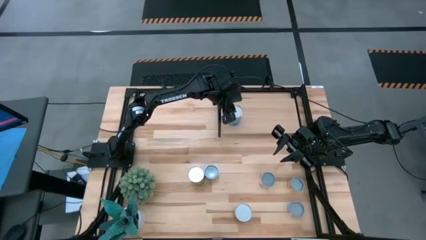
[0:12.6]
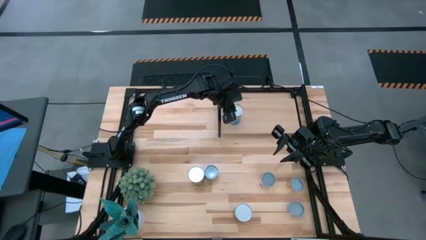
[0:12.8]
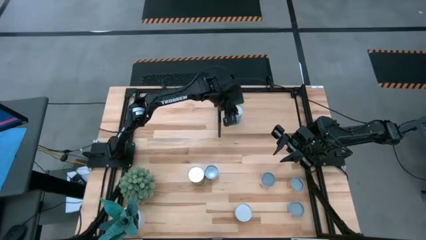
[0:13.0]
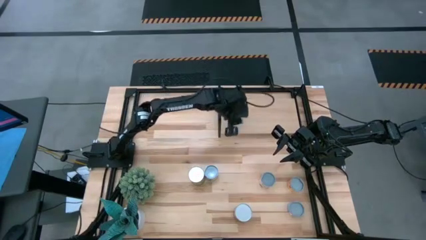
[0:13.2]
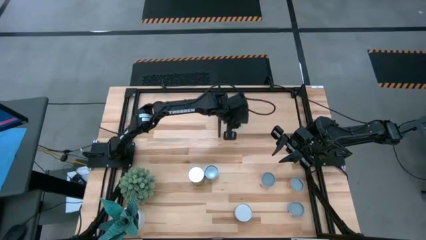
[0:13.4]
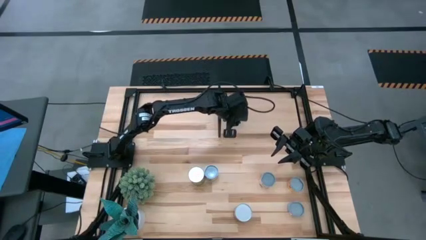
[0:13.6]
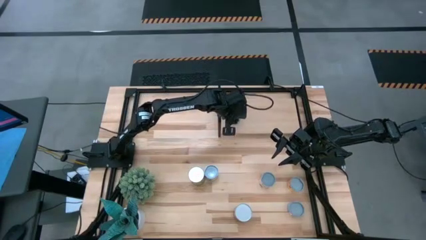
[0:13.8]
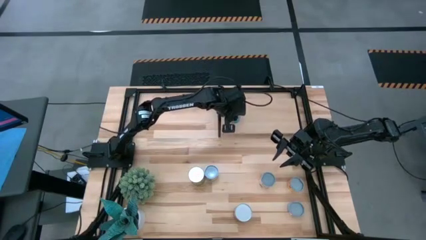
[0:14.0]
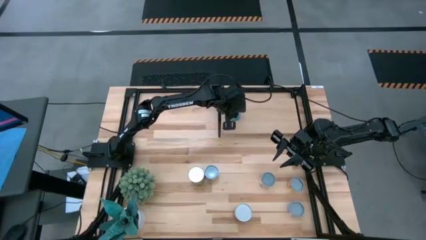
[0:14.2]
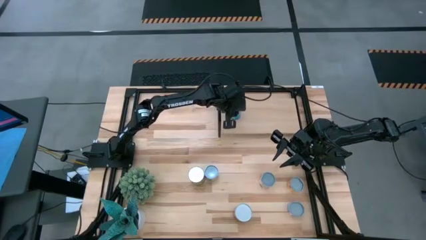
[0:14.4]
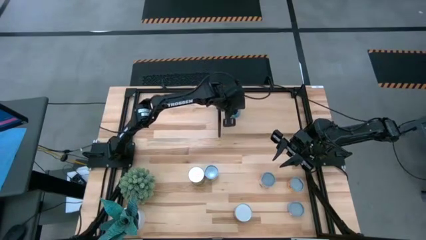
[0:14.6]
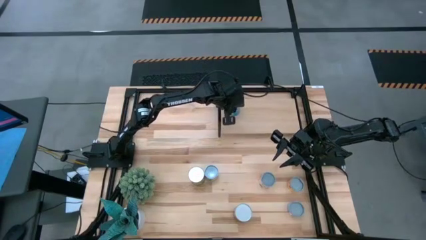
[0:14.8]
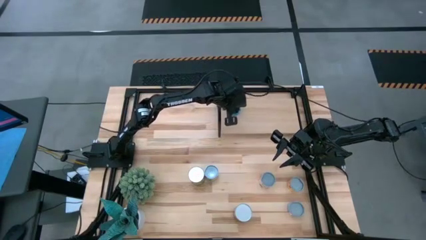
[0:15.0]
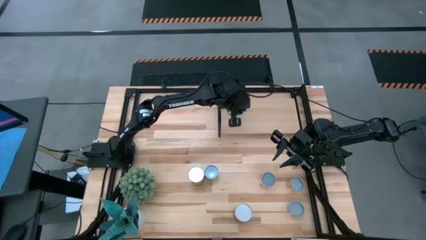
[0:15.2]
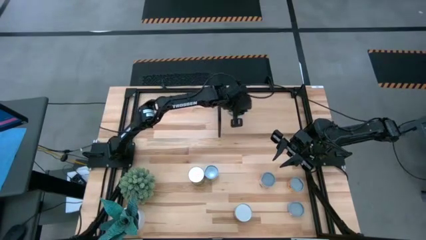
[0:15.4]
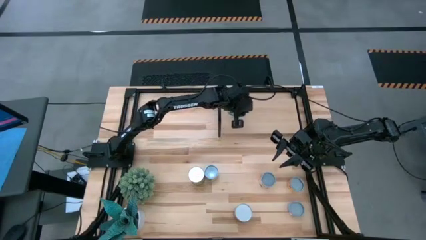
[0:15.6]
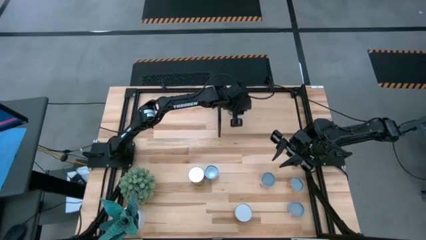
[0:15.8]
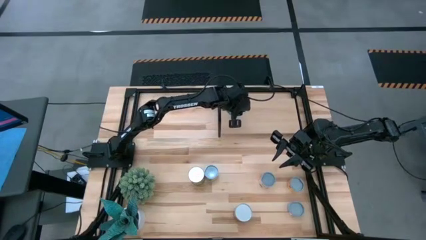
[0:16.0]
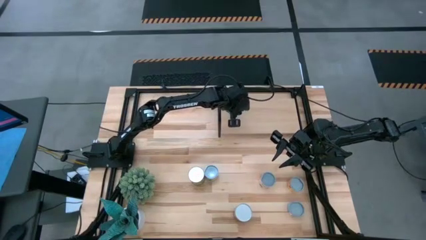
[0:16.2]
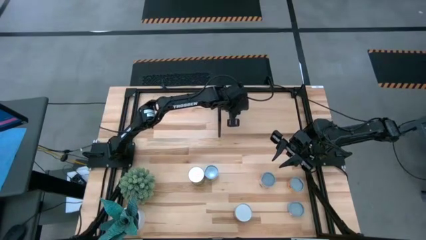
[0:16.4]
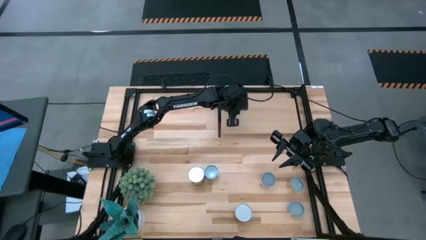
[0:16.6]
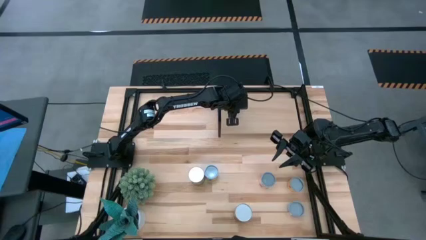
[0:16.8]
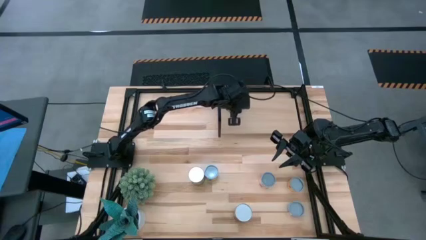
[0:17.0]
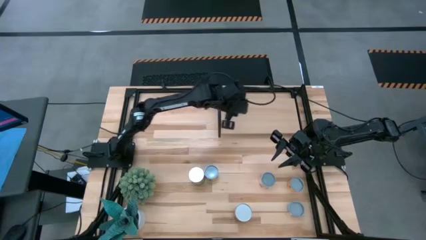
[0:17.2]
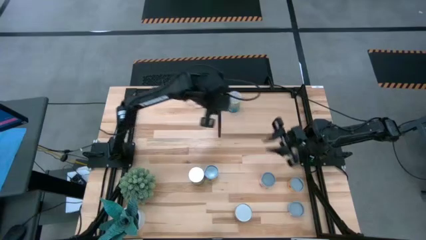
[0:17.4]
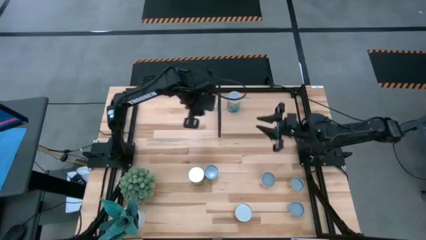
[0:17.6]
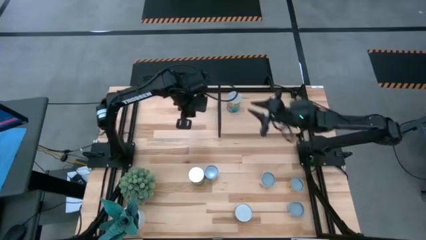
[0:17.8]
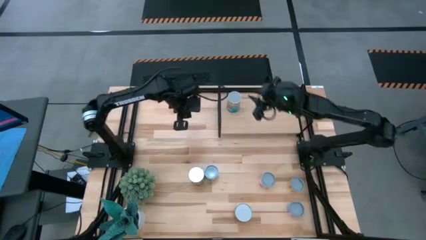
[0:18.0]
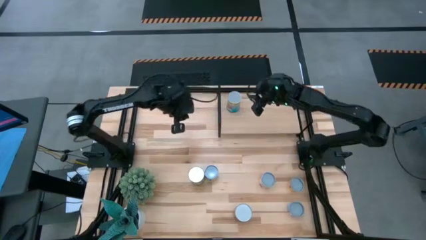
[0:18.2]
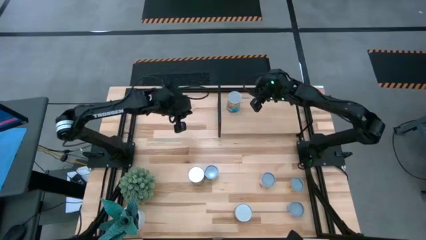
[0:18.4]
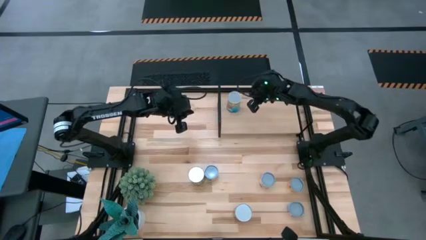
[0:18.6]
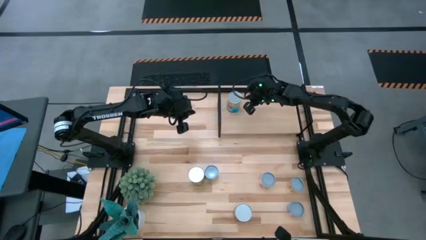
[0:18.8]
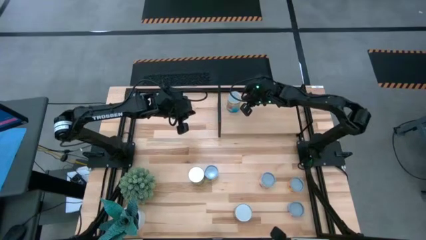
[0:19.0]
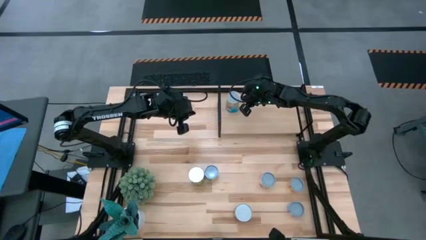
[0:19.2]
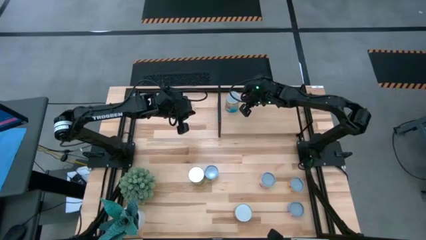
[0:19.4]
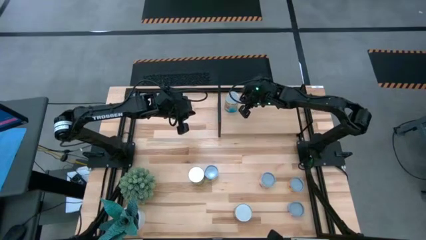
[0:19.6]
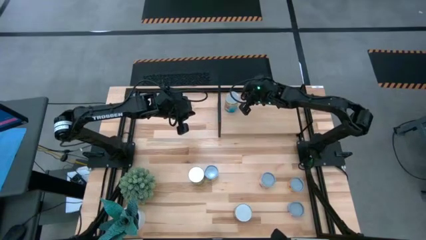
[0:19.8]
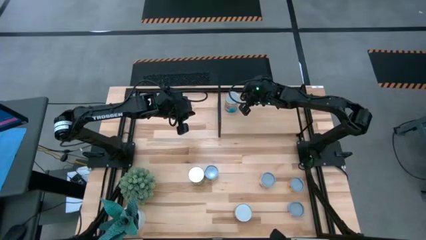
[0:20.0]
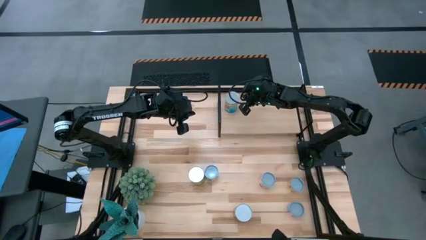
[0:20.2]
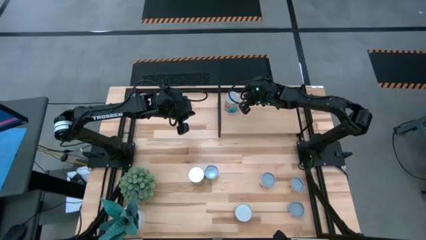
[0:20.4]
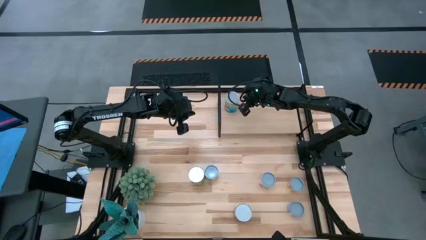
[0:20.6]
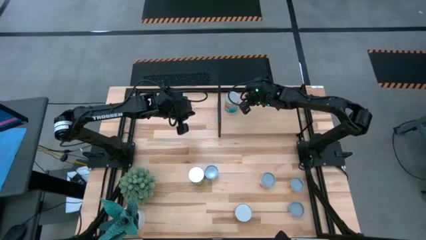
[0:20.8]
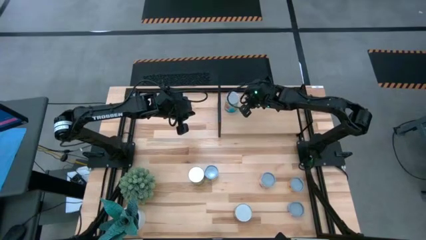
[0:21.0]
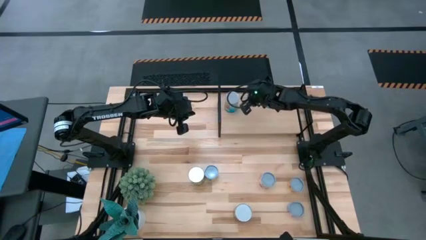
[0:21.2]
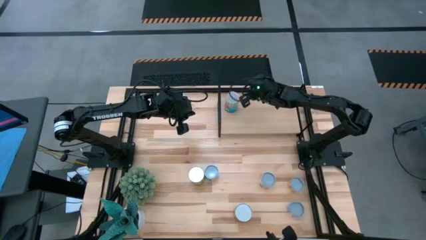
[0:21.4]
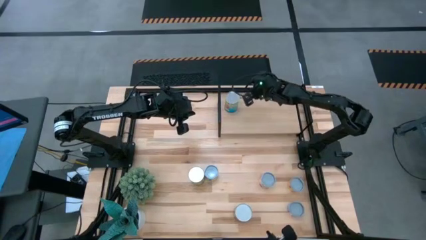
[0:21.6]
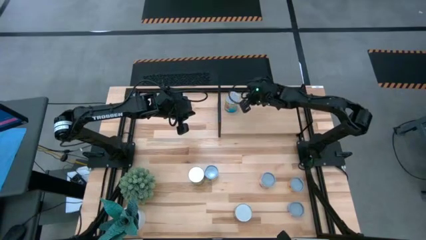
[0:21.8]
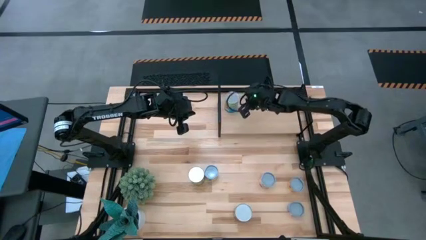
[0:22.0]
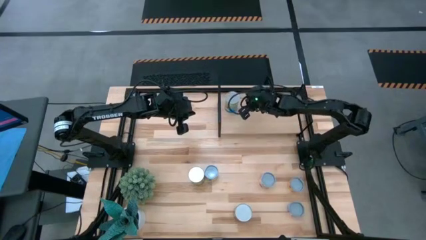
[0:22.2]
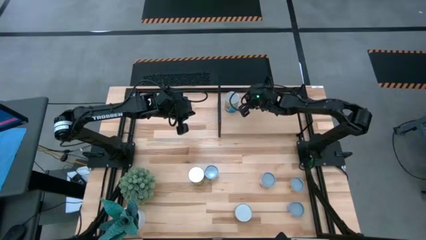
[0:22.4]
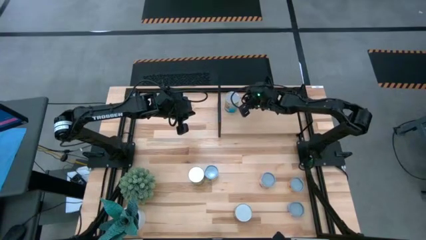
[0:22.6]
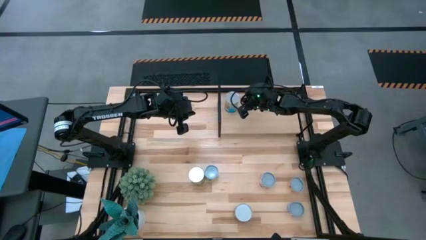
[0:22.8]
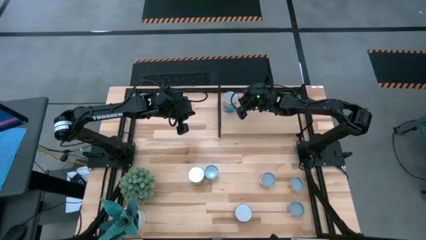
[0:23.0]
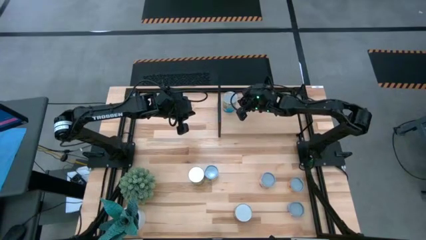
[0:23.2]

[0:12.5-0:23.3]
Task: Pick and place cans onto a shelf
Put the canned tomatoes on the shelf

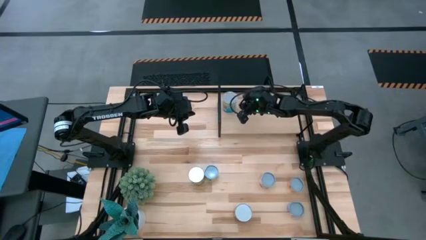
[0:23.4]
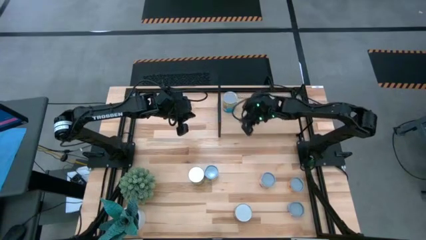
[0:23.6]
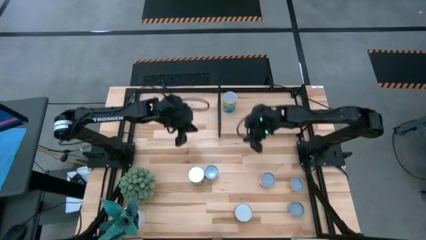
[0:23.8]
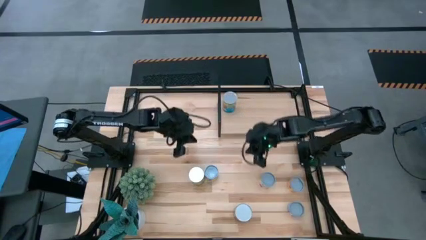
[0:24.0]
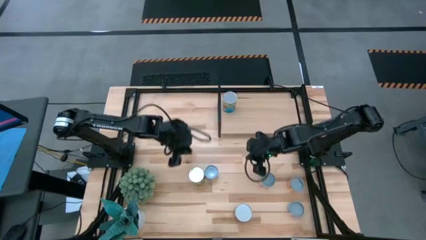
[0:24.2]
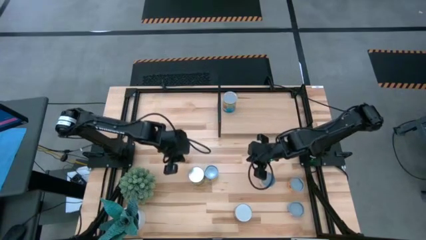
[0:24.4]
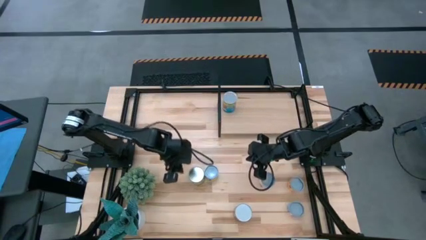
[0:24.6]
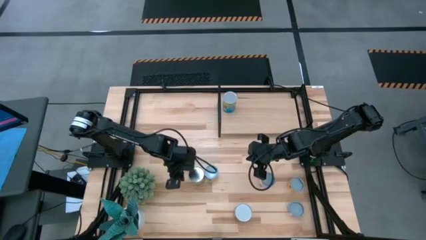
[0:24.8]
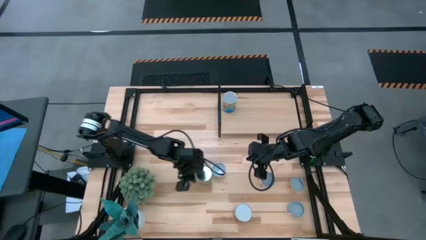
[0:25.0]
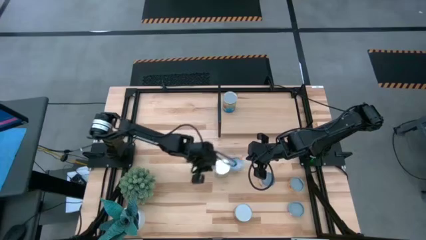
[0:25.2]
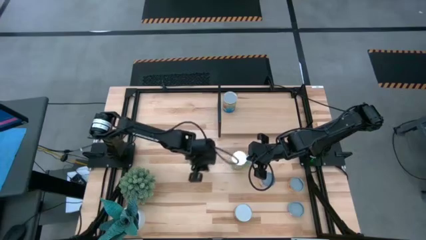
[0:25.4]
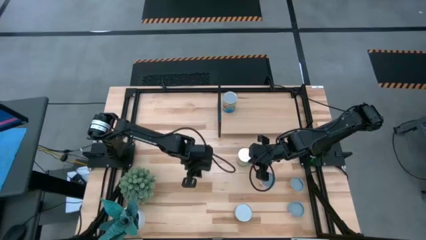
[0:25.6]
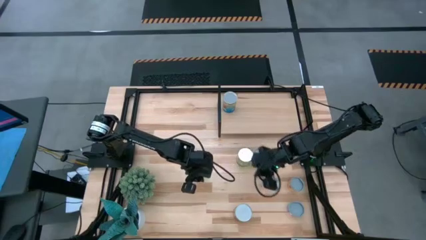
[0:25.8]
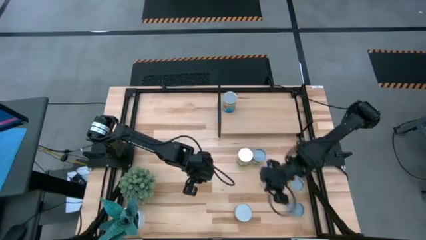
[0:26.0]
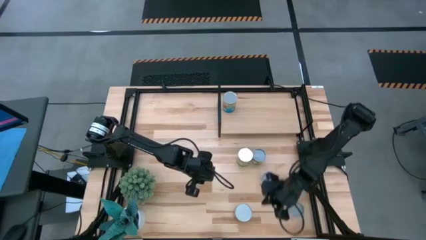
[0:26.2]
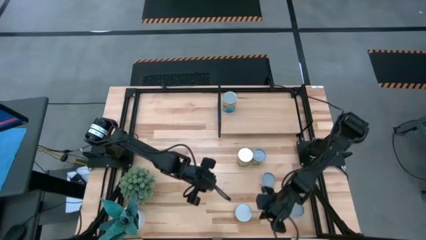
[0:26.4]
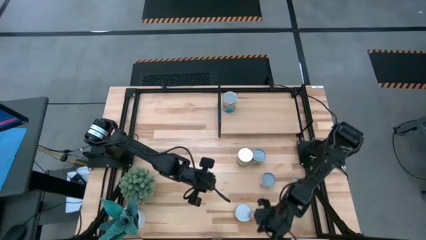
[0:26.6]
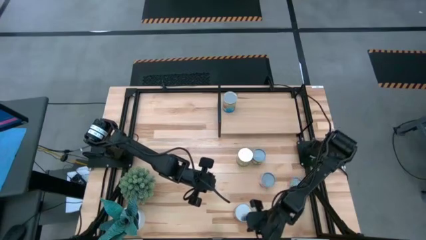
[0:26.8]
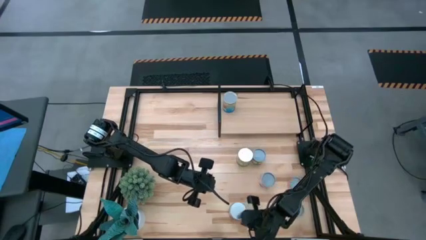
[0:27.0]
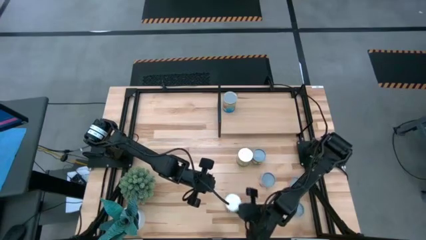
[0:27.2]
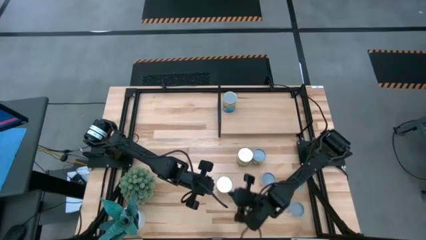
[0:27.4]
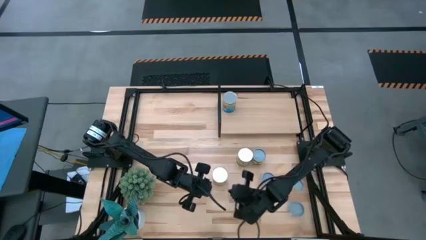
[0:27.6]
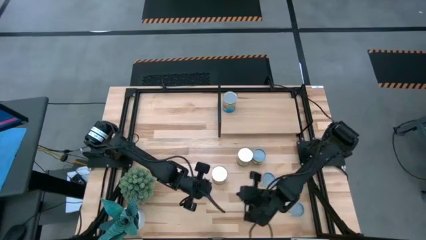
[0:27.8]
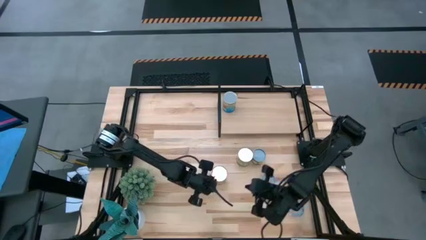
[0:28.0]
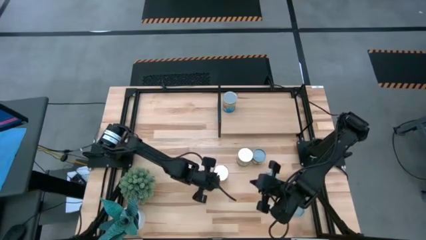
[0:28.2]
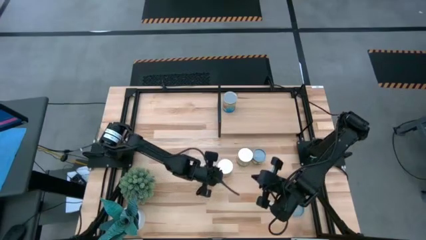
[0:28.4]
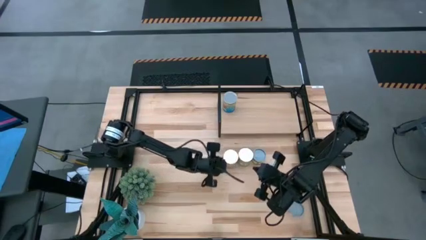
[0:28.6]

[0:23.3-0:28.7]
Move the cans to the middle right of the table
